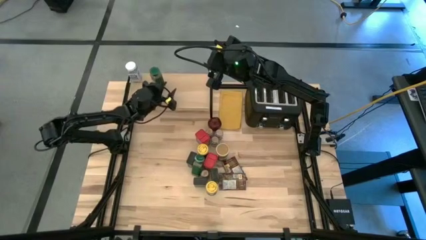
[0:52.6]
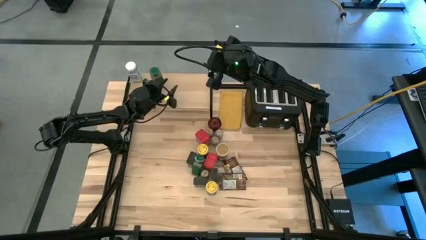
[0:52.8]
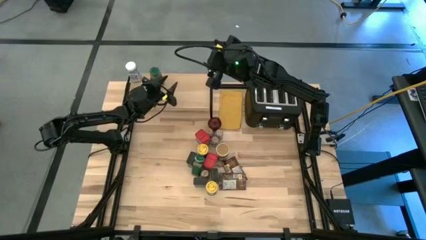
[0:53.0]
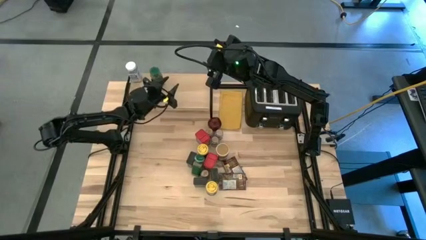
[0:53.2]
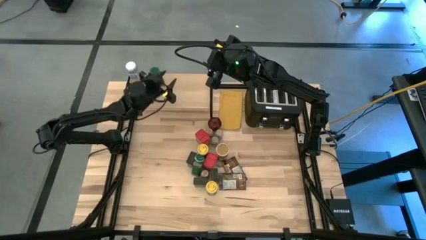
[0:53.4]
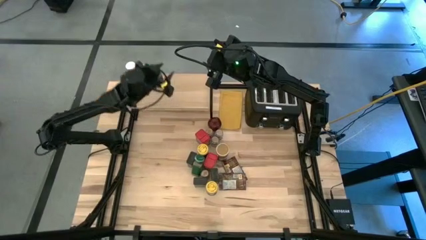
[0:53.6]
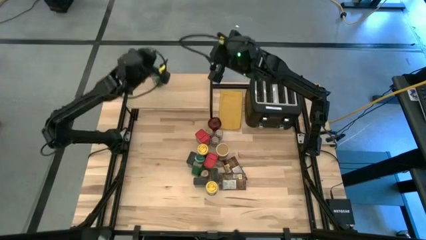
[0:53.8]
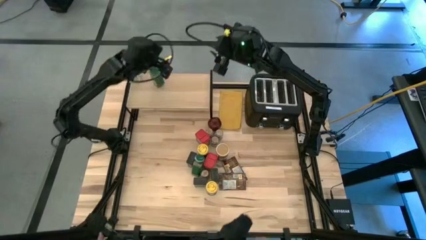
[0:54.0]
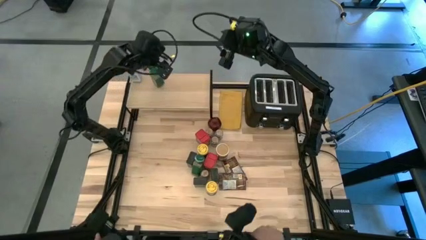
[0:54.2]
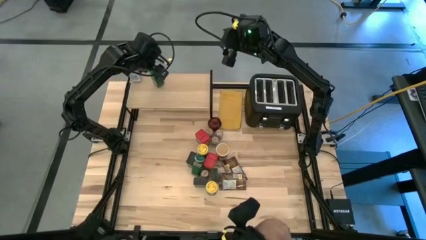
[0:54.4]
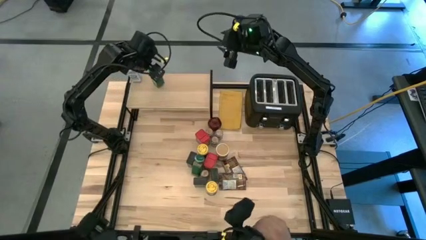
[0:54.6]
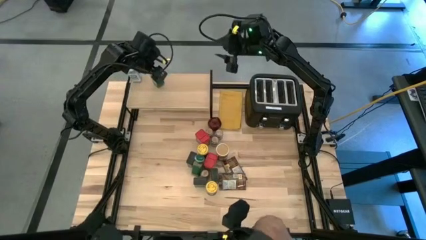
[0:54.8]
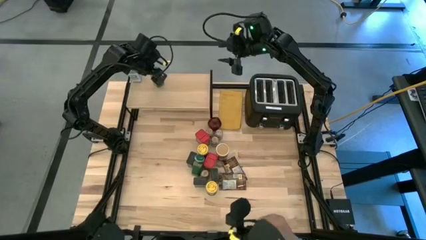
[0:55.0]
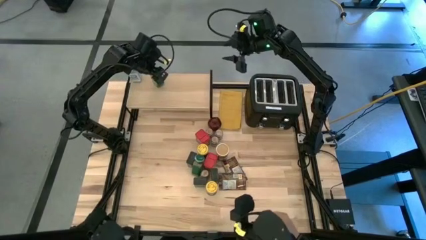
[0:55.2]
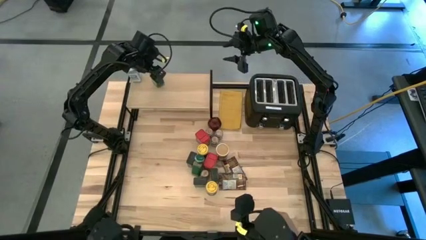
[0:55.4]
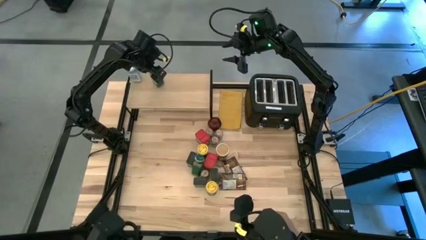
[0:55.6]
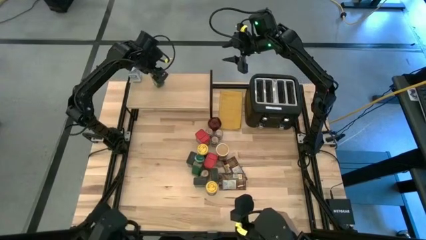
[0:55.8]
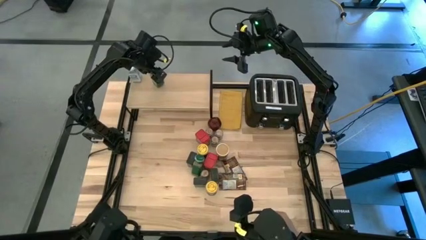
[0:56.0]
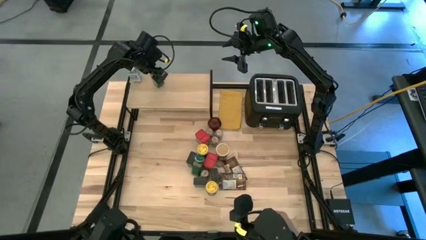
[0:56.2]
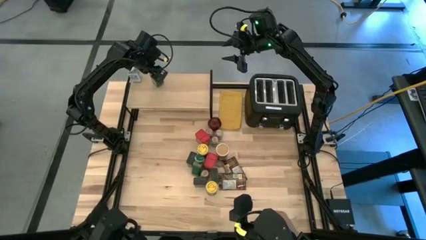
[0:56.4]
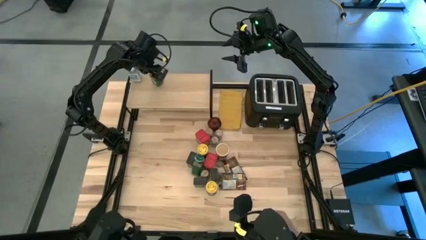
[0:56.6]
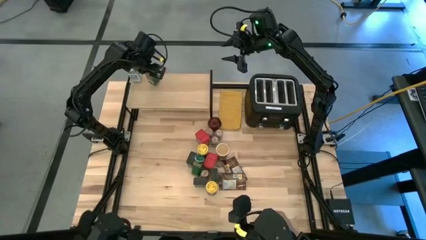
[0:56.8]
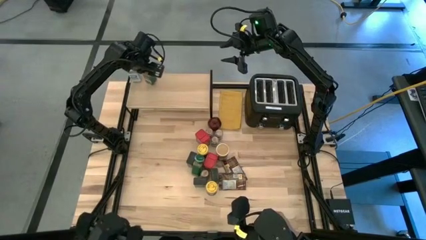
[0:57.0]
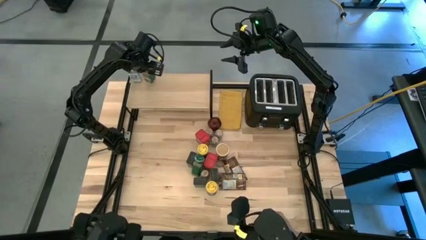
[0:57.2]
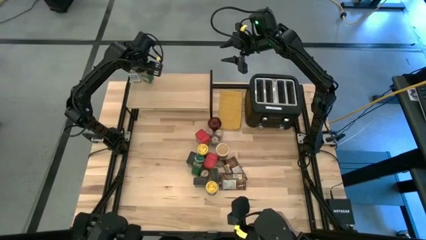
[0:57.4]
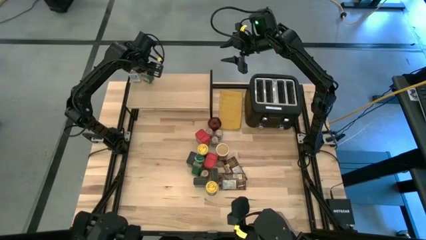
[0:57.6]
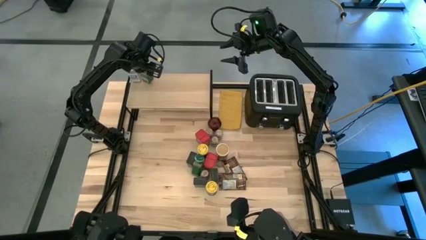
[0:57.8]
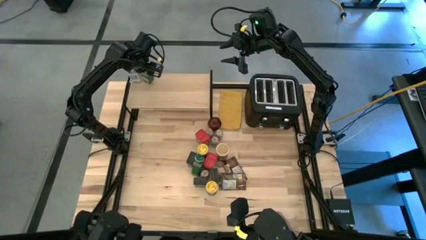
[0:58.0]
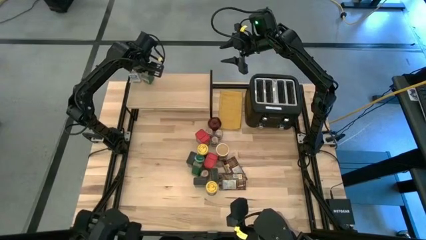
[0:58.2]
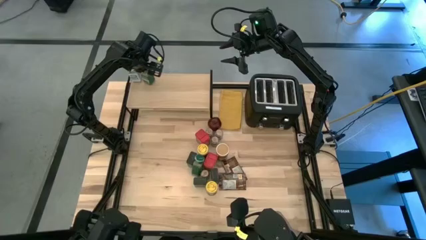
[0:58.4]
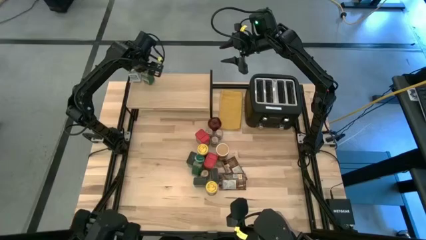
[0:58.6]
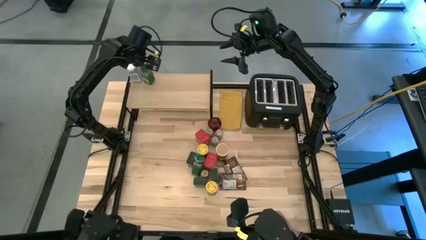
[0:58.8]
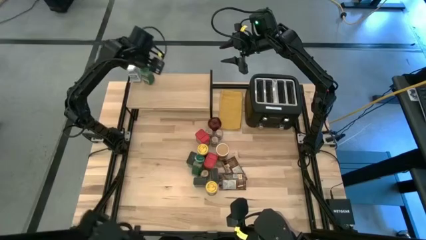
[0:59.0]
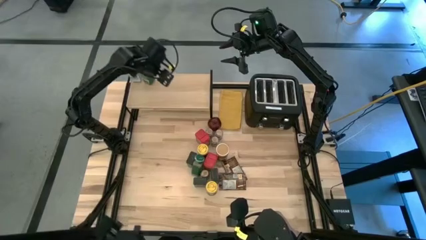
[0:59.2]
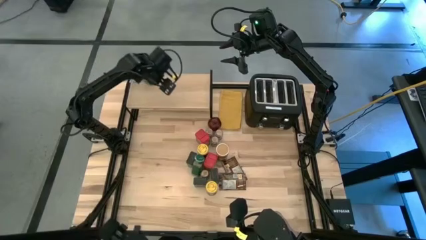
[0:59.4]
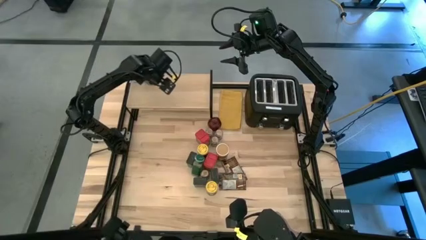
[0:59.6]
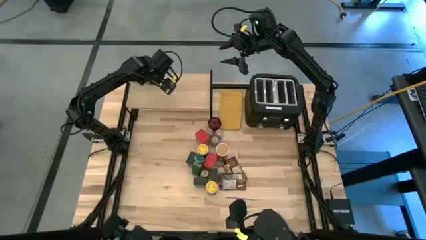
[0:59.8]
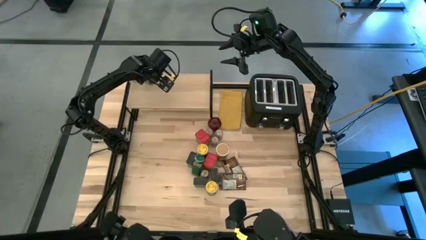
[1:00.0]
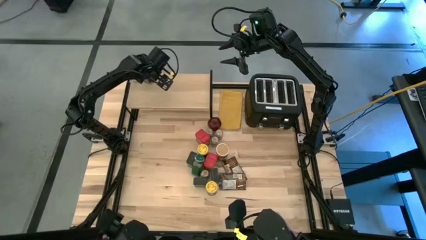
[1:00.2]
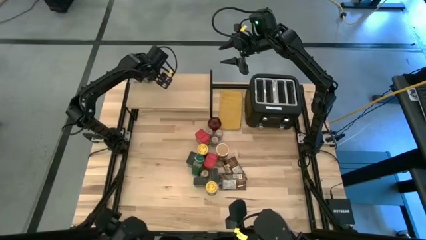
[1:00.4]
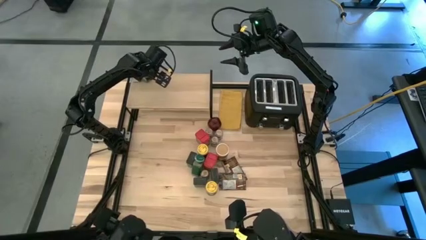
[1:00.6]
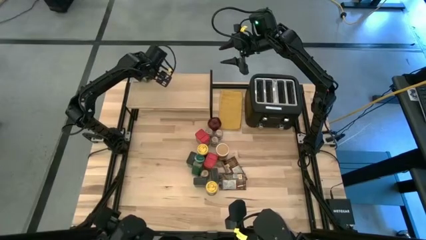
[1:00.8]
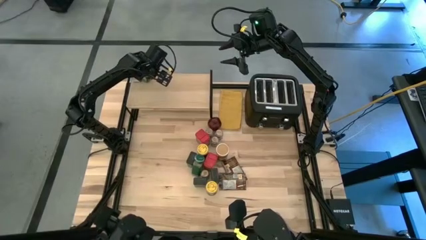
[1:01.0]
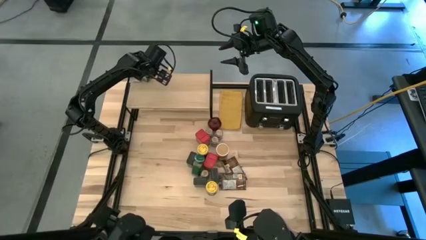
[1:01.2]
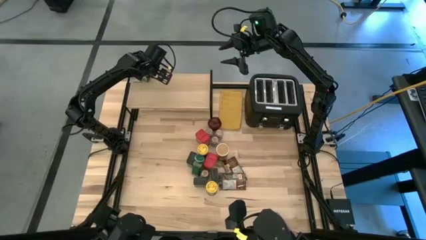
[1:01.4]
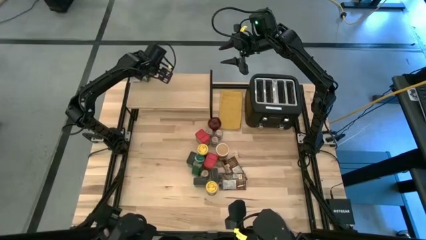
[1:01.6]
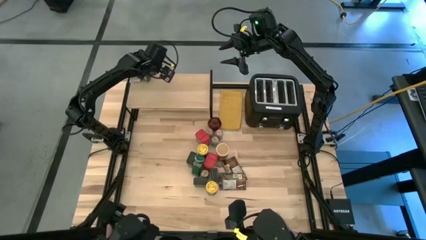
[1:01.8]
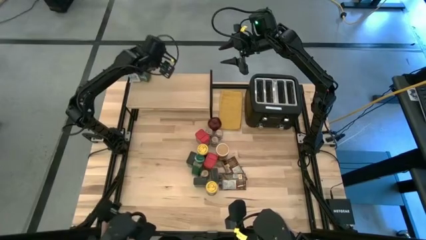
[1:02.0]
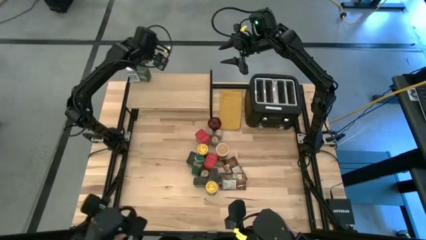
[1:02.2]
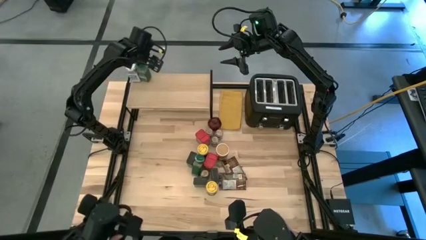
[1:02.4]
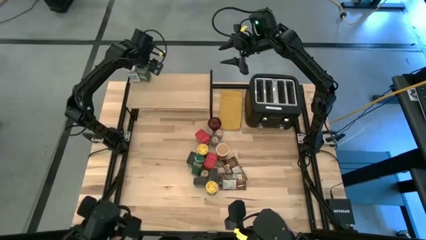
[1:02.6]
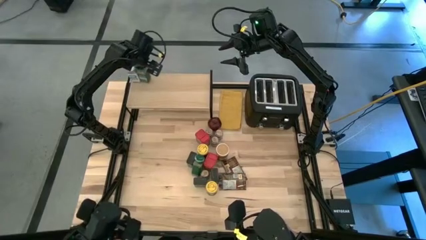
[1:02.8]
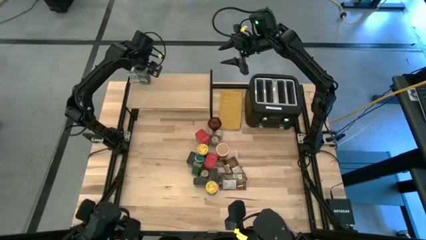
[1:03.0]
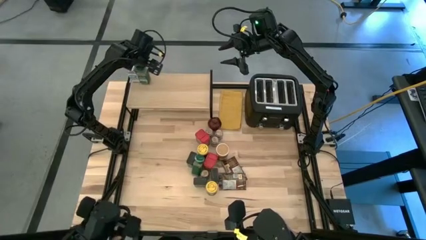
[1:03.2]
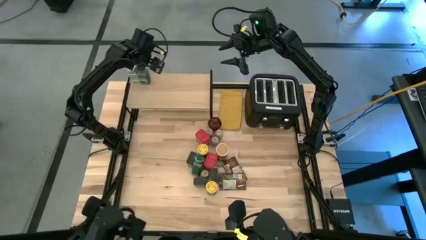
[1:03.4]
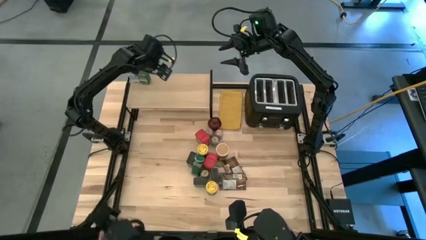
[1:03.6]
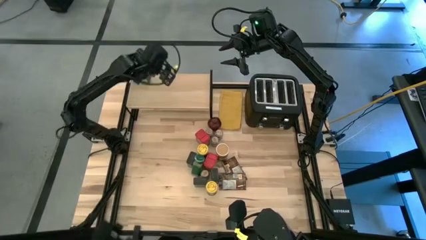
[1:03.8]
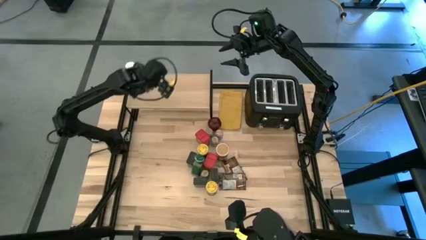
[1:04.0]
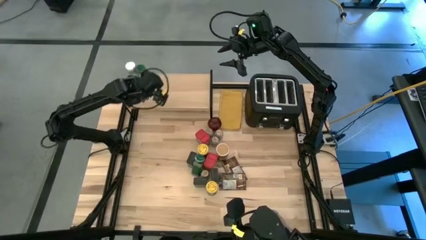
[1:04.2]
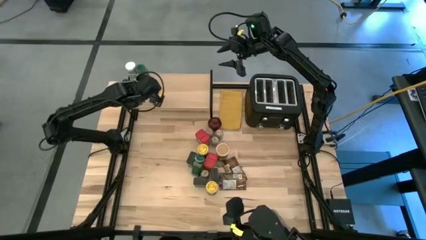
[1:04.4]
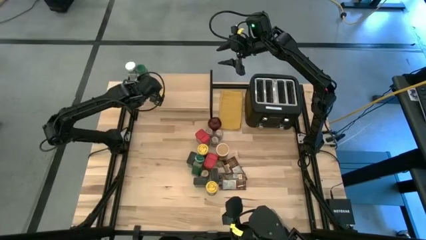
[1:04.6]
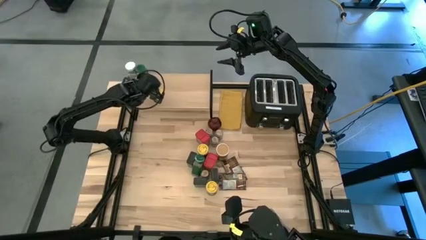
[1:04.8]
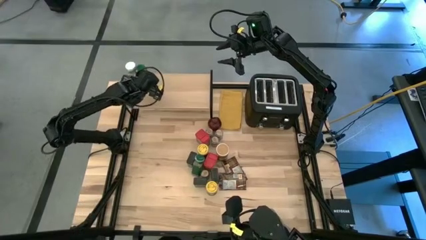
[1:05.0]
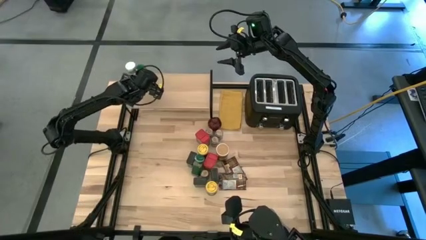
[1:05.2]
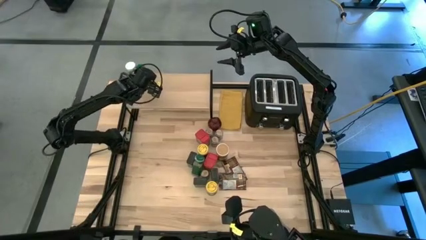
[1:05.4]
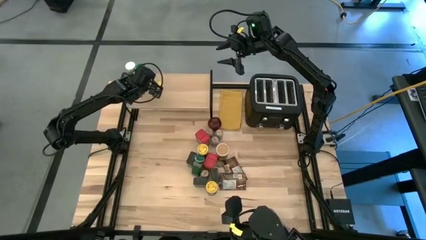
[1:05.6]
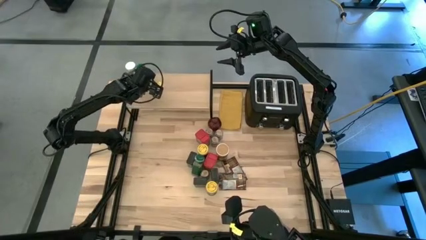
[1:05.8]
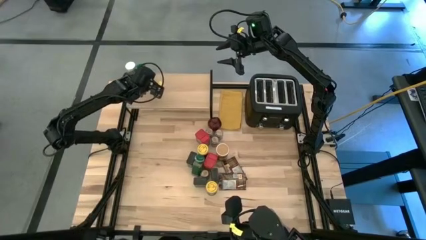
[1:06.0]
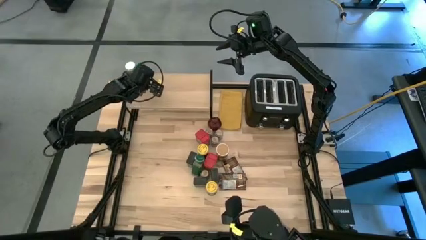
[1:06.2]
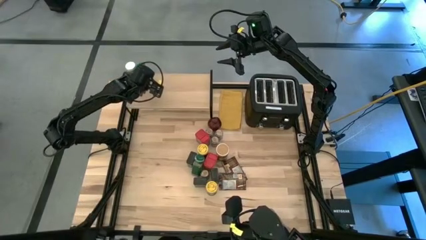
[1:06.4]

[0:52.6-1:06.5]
Task: Shelf spices
Put the bottom green seasoning bottle on the shelf

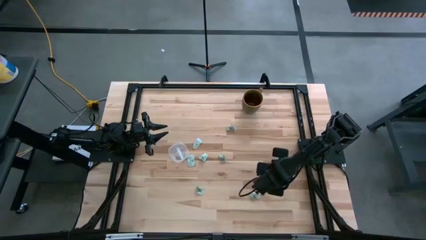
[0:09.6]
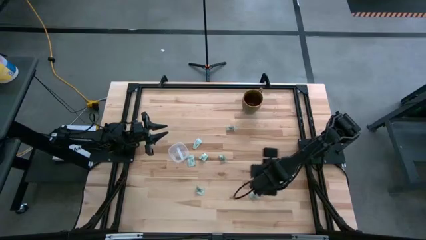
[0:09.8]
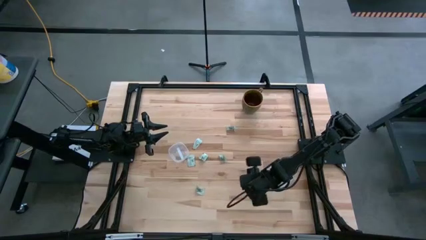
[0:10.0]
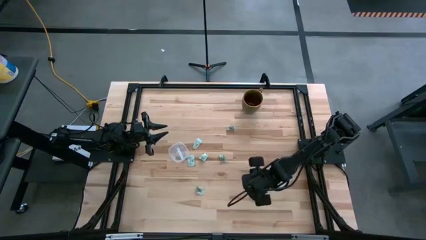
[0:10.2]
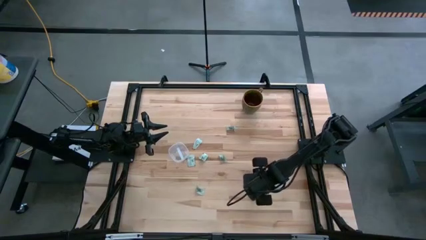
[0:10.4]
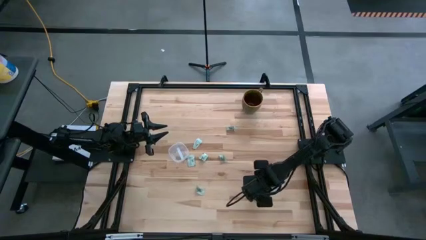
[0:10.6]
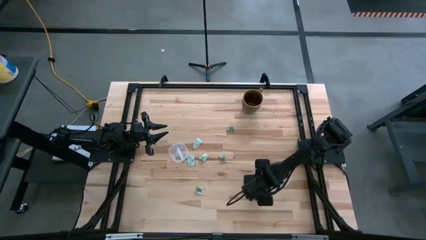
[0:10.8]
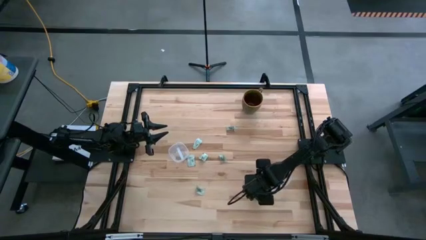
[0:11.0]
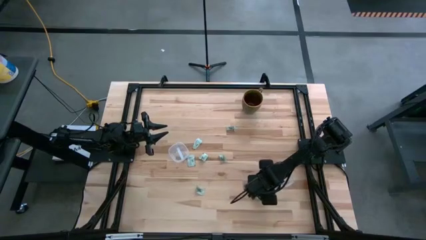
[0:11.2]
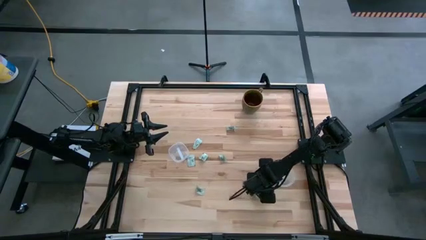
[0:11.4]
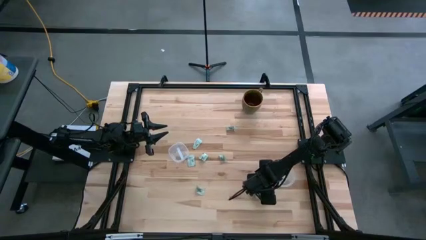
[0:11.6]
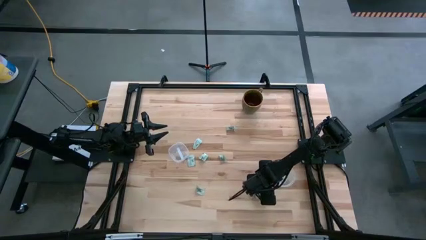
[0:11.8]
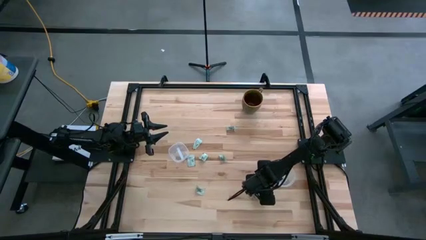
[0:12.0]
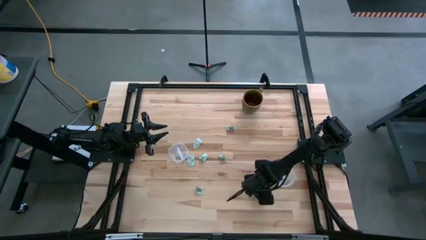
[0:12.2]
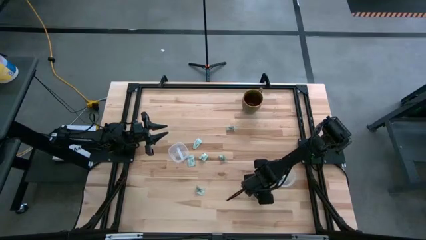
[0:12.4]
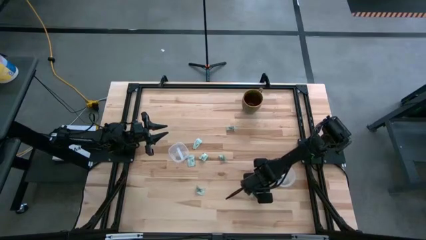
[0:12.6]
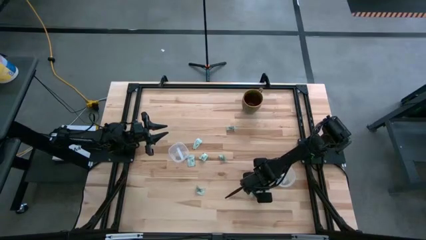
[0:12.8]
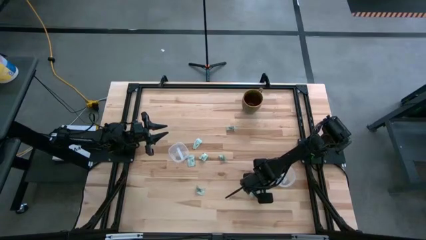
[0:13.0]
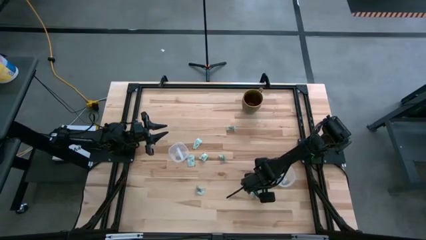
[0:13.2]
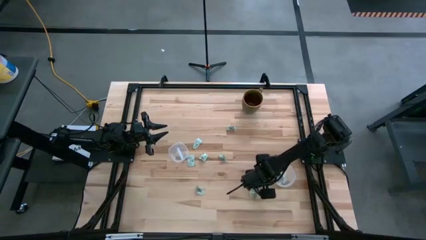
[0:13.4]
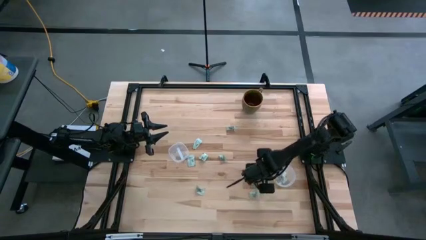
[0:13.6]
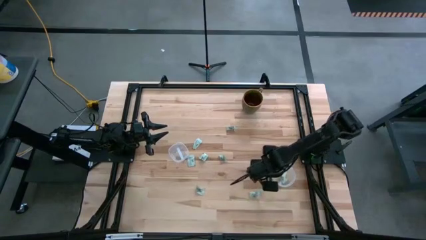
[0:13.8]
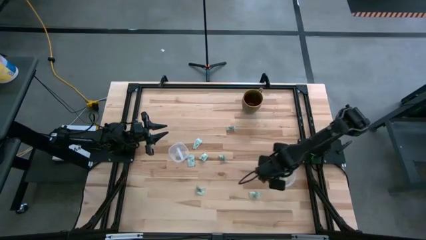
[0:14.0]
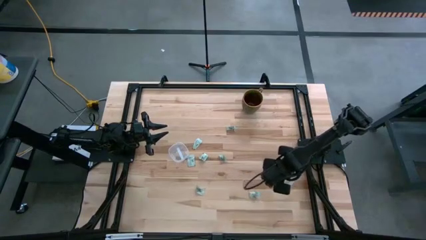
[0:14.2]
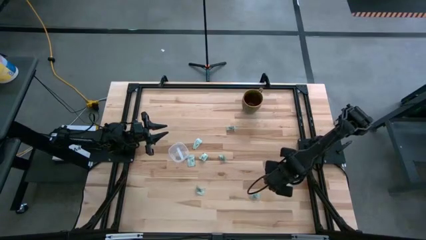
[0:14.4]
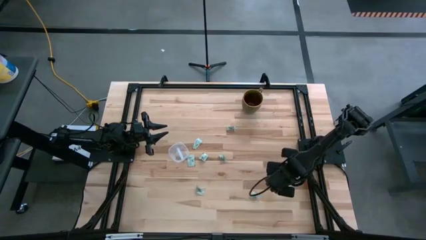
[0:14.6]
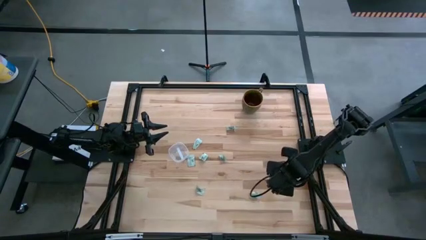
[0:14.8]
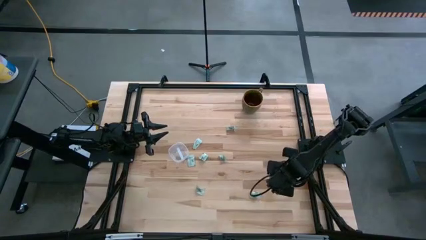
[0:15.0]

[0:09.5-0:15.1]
Task: Pick and place Stevia / Truvia into bins
Put the stevia packet into the round transparent container
